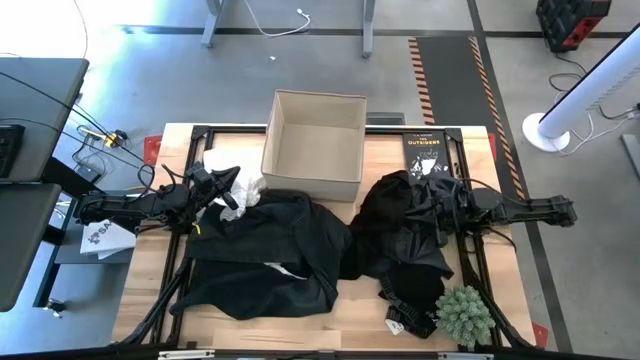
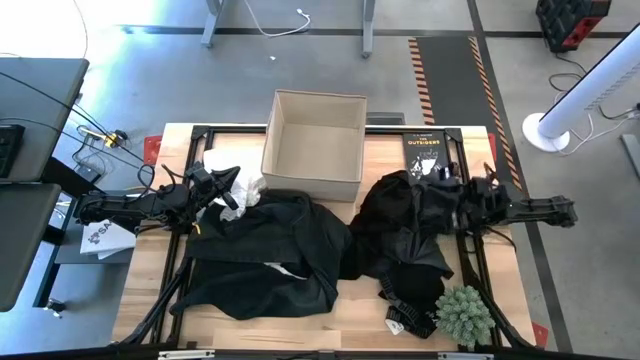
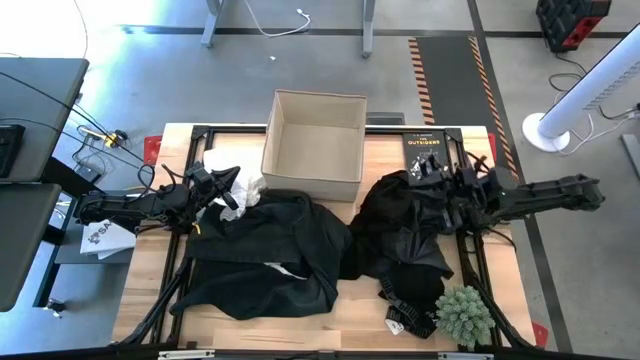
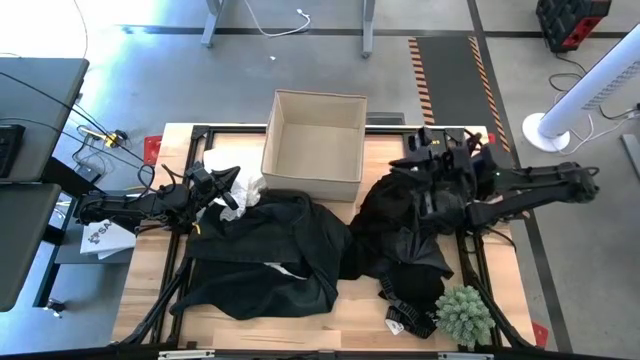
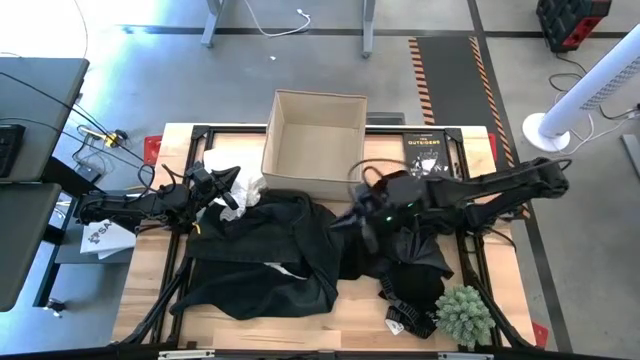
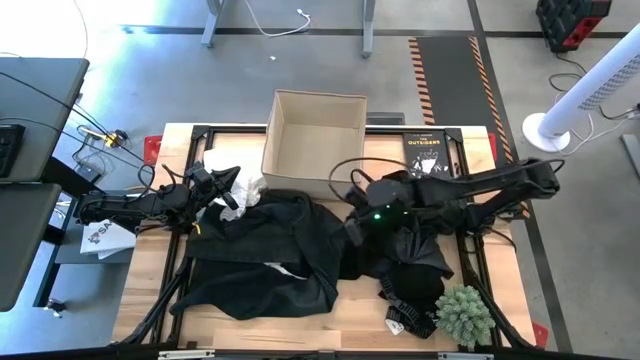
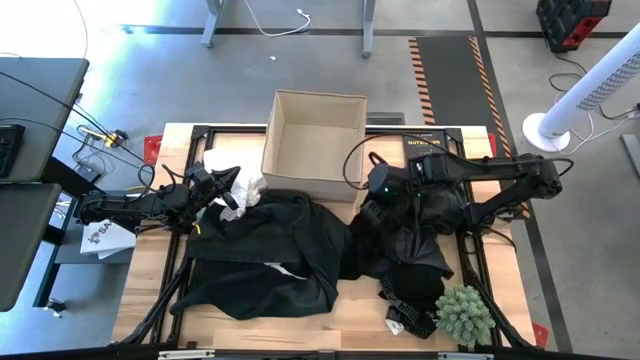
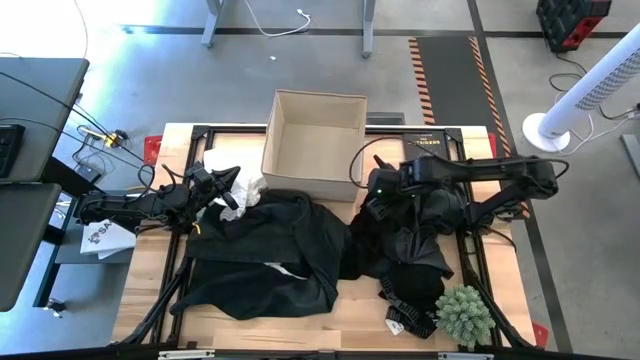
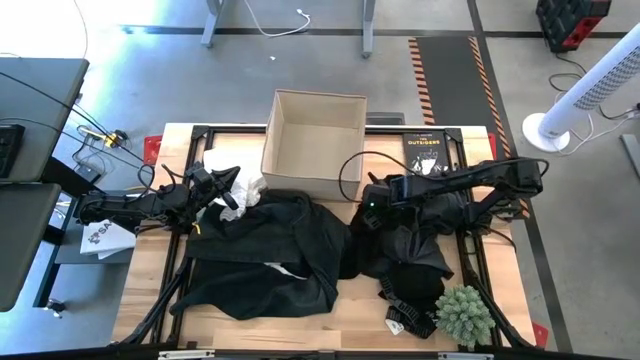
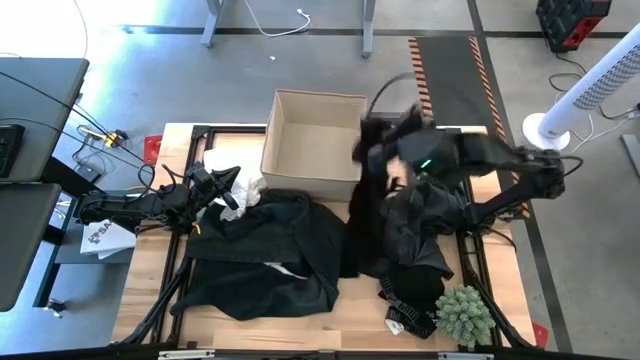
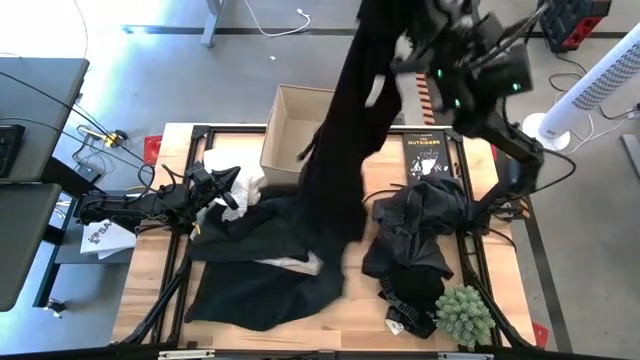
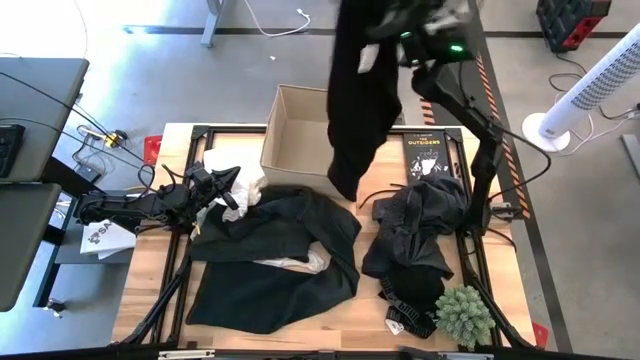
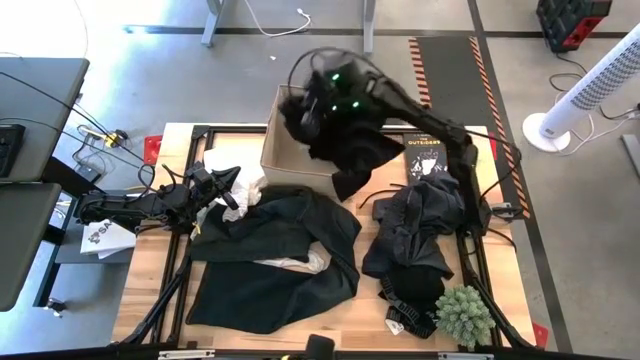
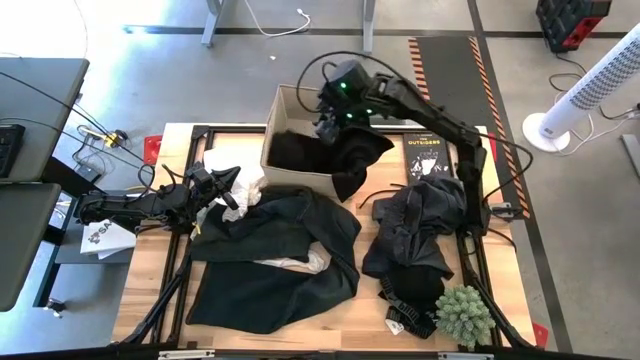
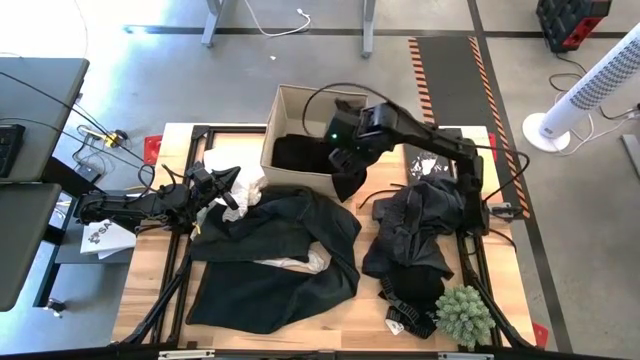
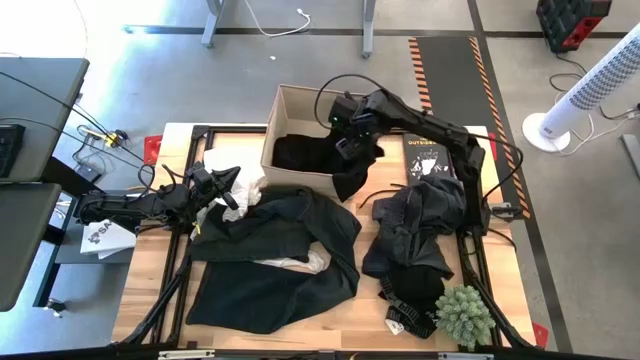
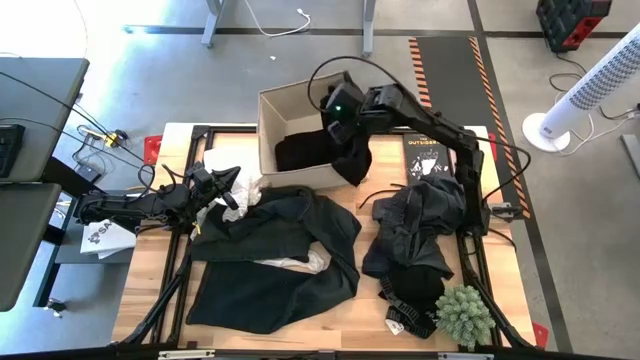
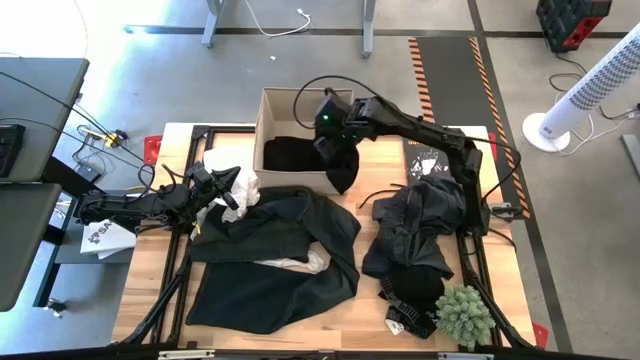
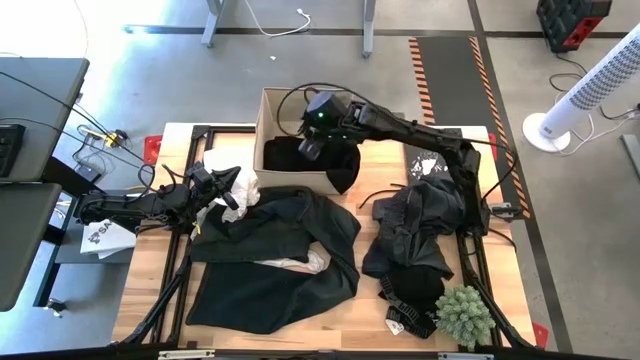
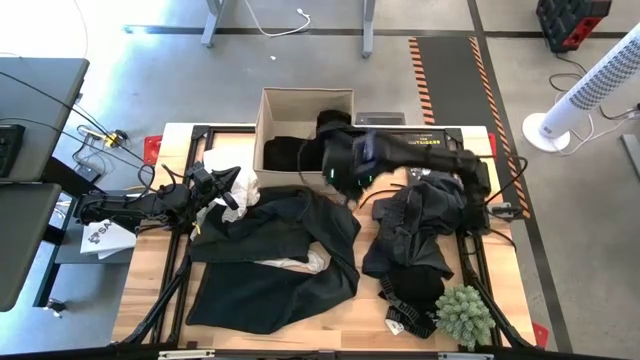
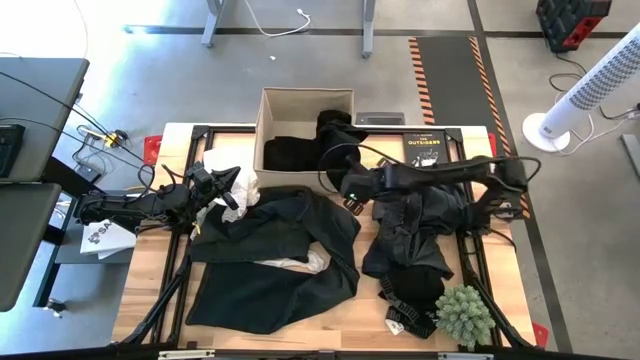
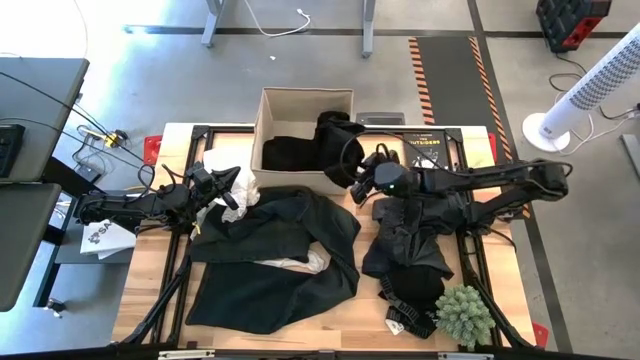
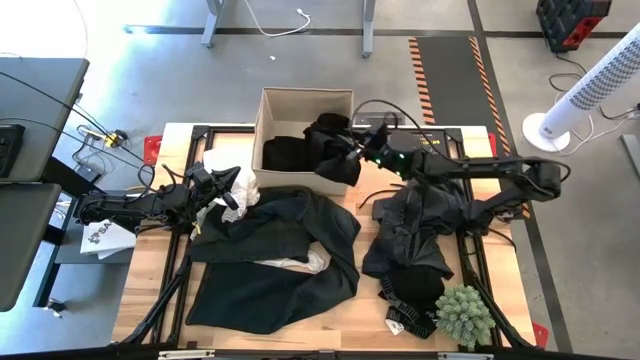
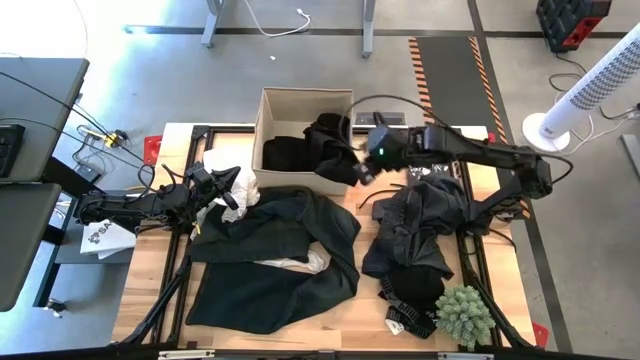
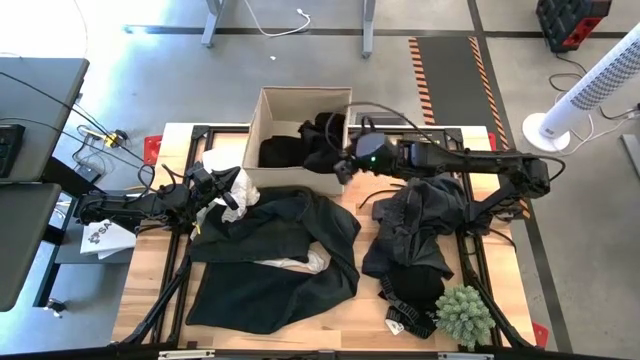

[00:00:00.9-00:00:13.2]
Task: Sort clothes
Put the black shirt into the laundry bin

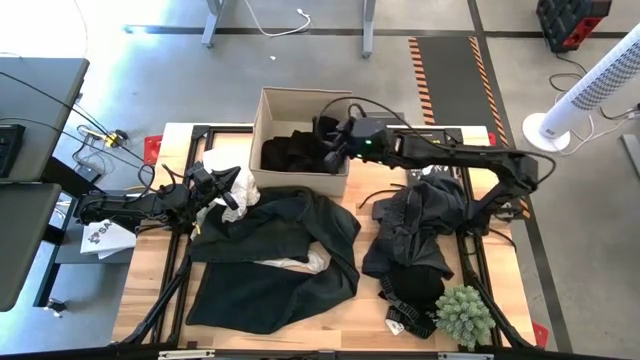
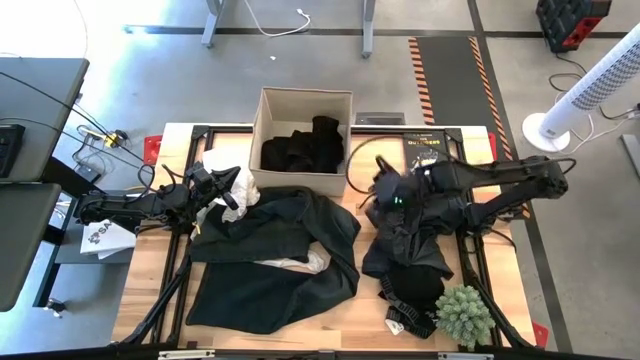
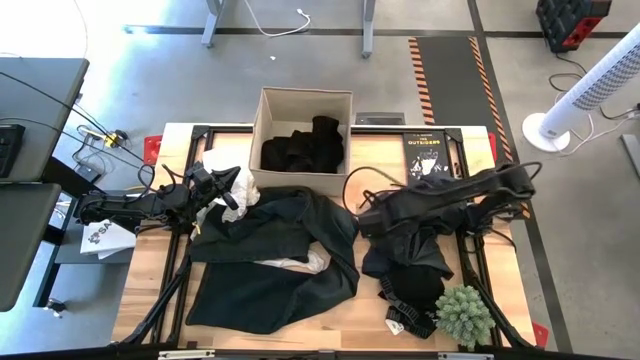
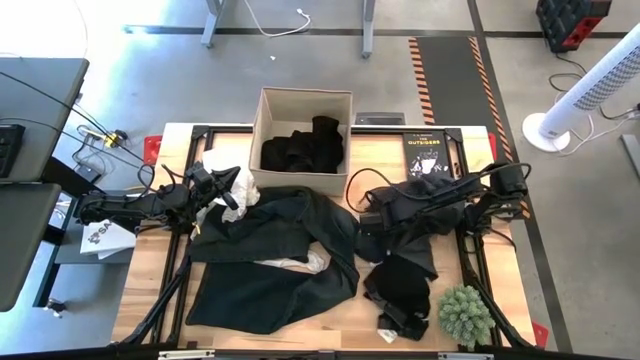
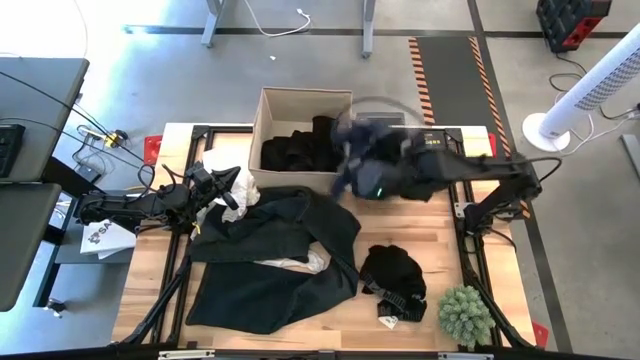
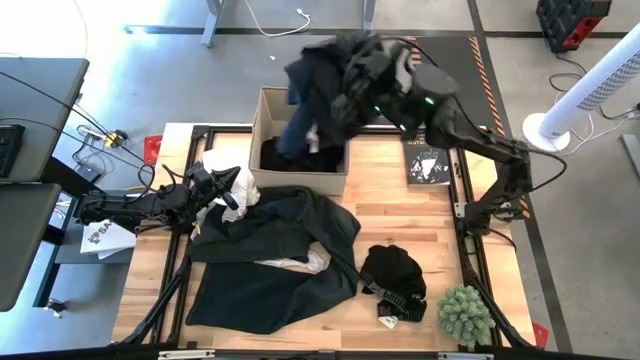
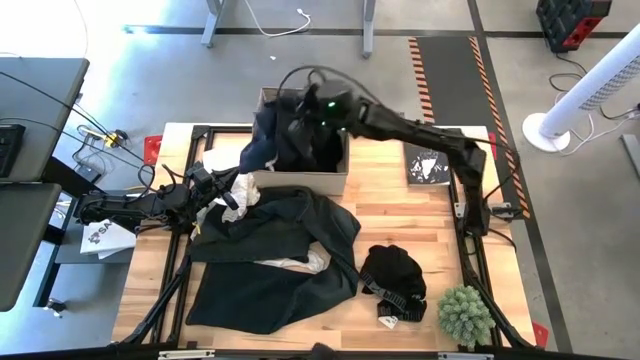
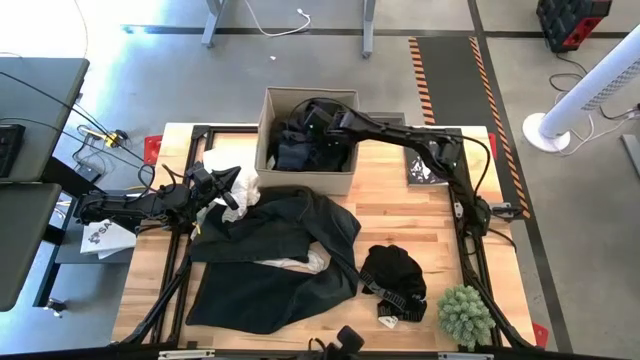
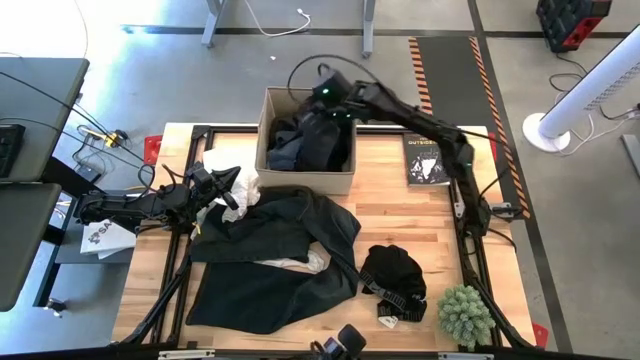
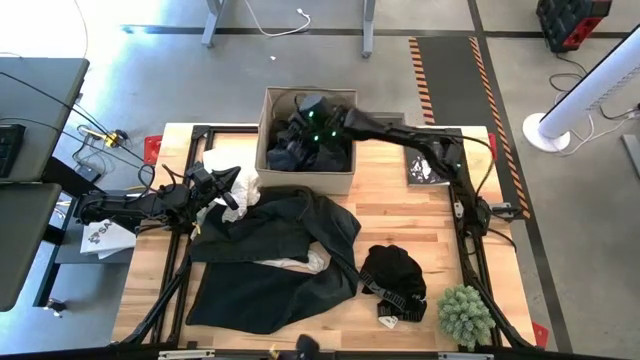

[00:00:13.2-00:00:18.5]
Put the black shorts into the laundry bin

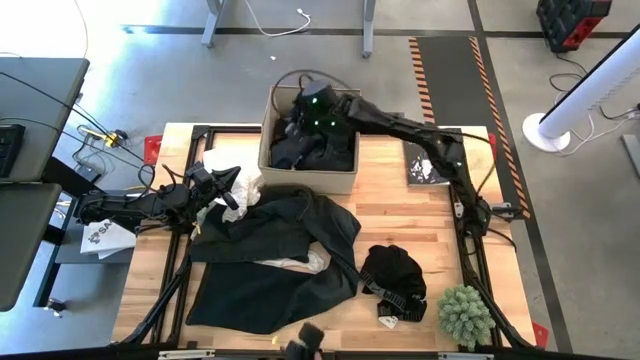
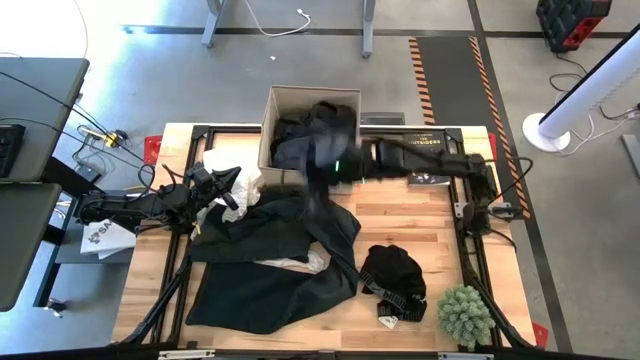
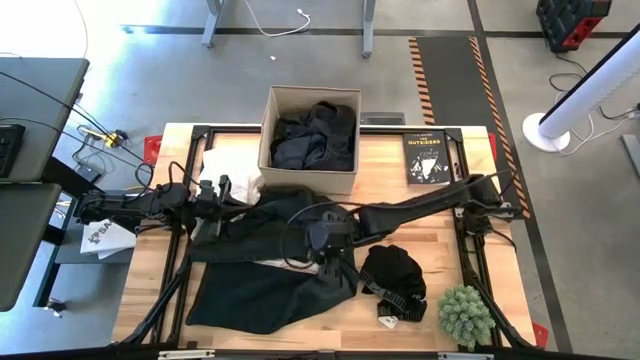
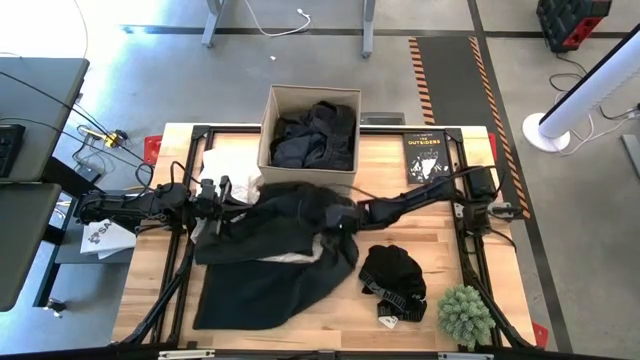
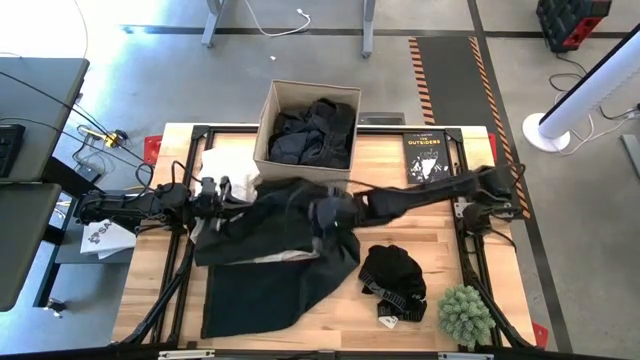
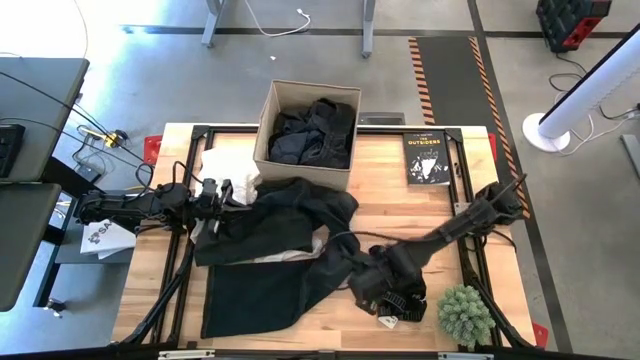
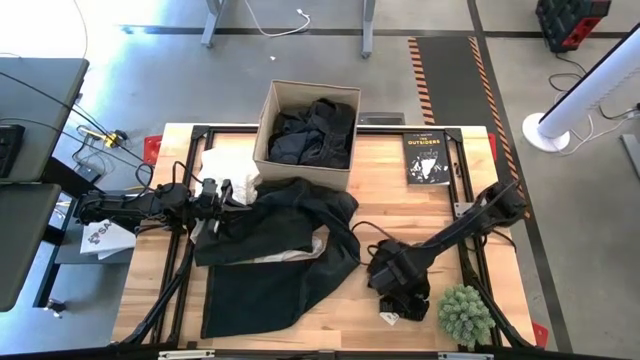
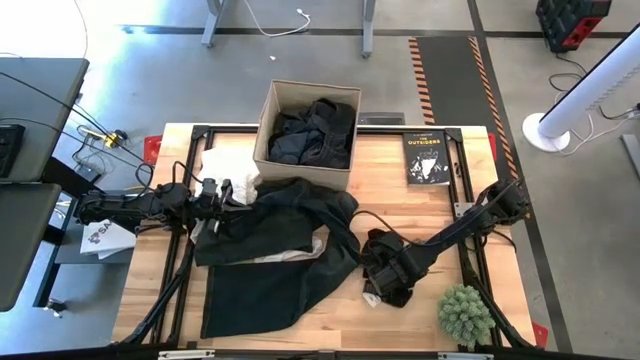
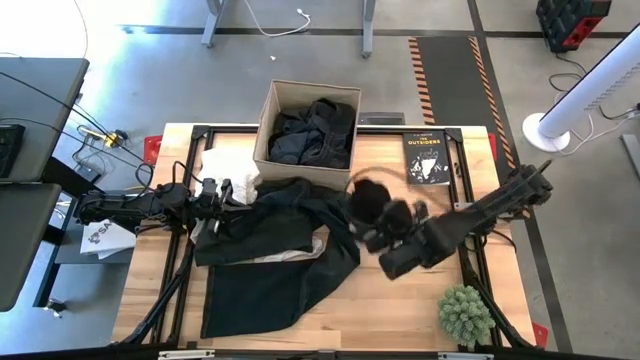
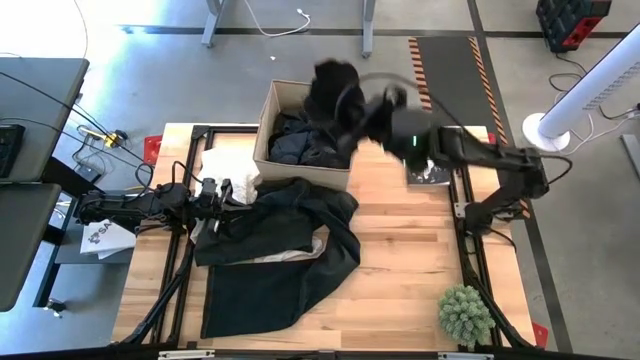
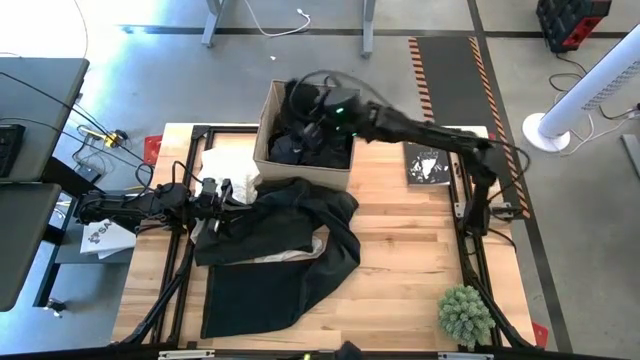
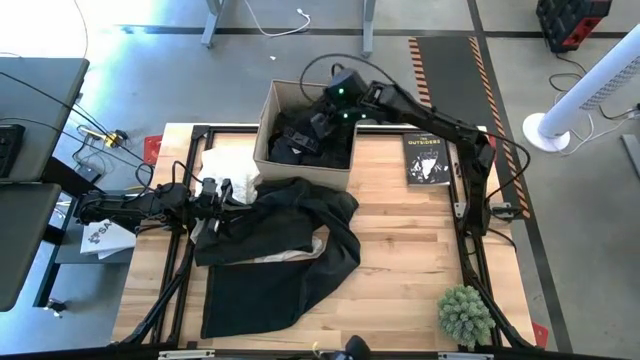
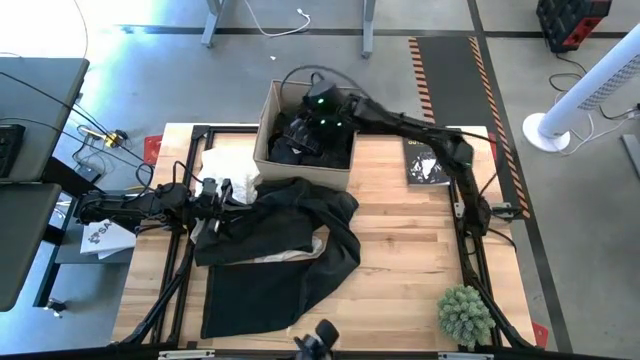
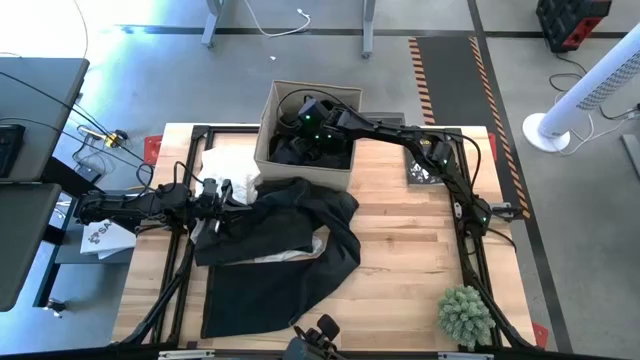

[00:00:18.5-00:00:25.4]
Put the black underwear into the laundry bin
